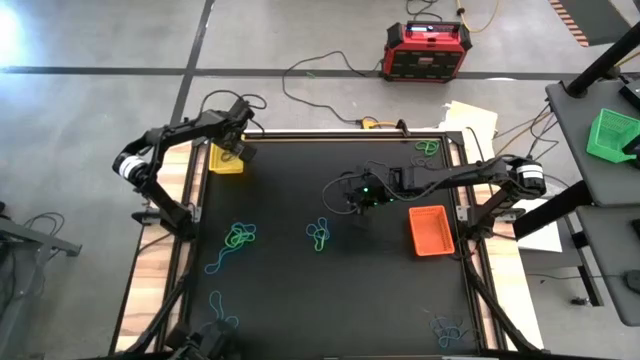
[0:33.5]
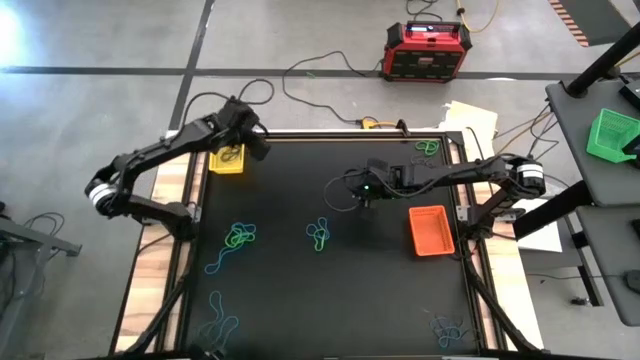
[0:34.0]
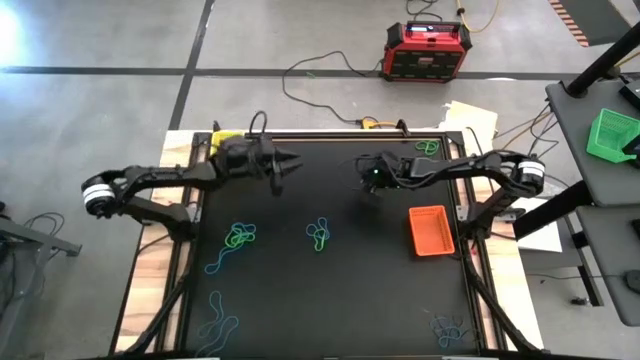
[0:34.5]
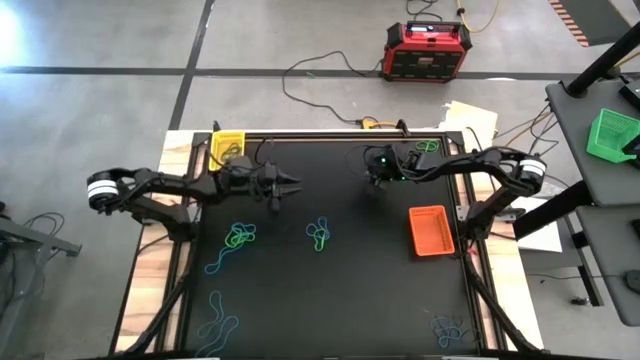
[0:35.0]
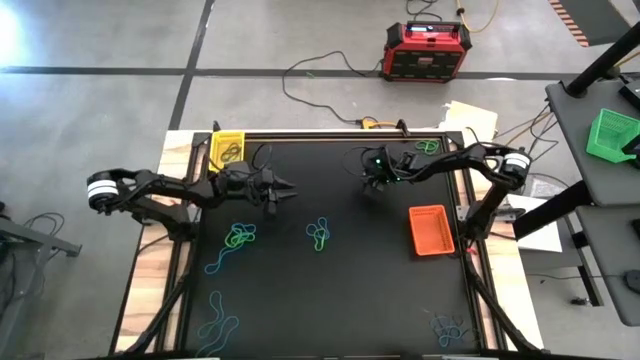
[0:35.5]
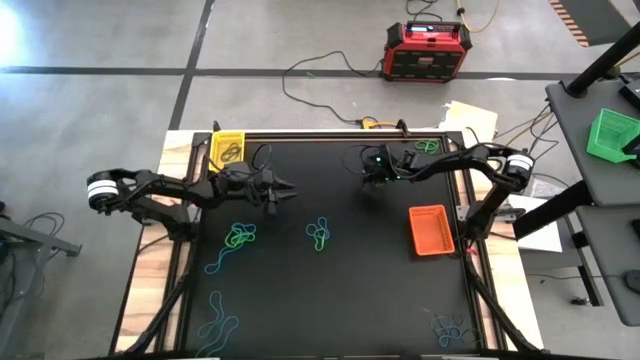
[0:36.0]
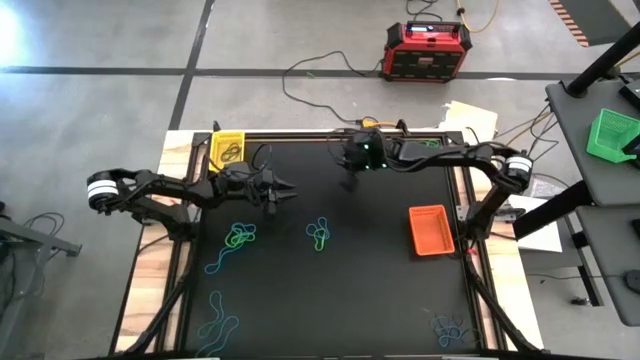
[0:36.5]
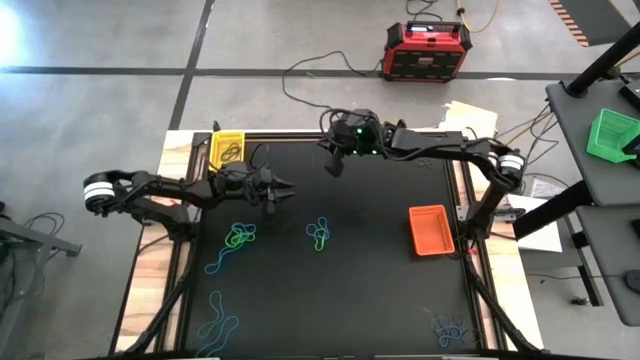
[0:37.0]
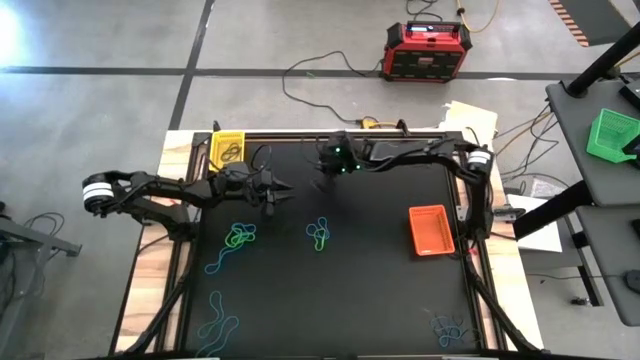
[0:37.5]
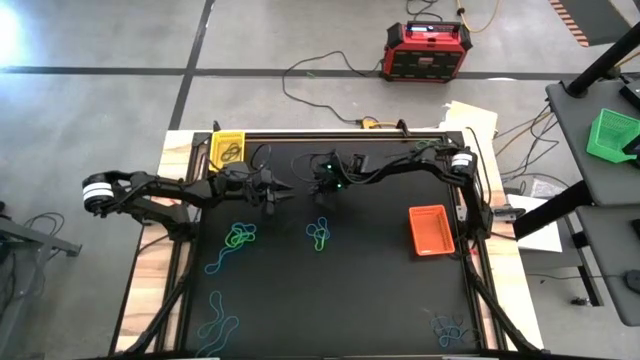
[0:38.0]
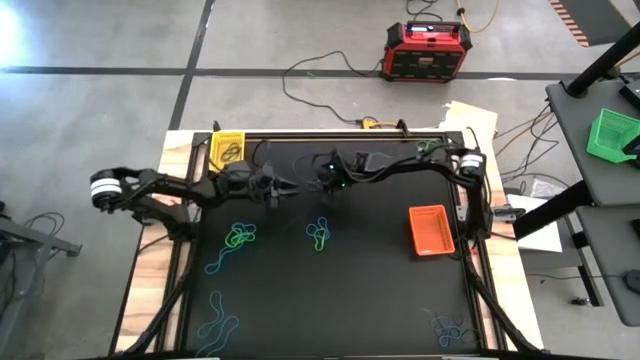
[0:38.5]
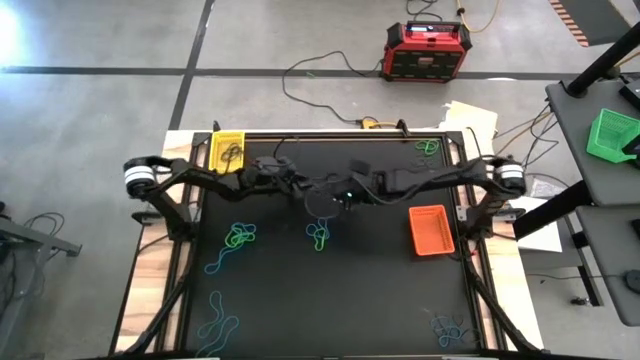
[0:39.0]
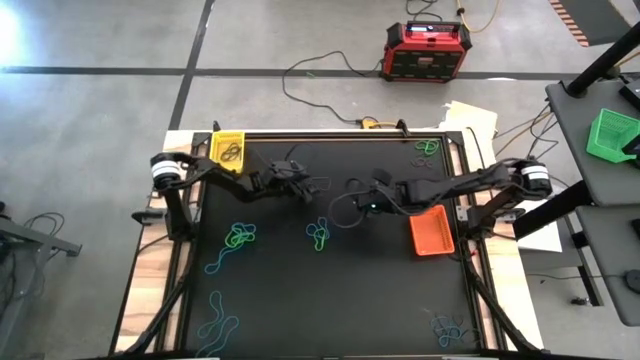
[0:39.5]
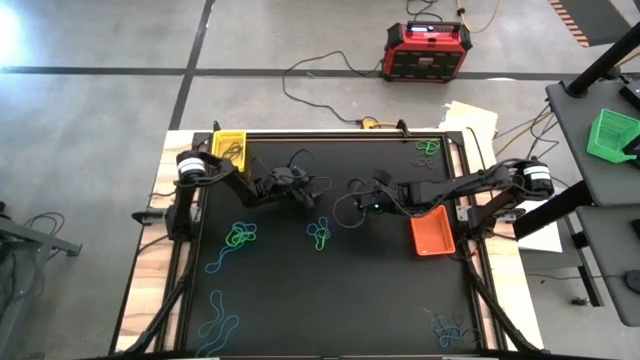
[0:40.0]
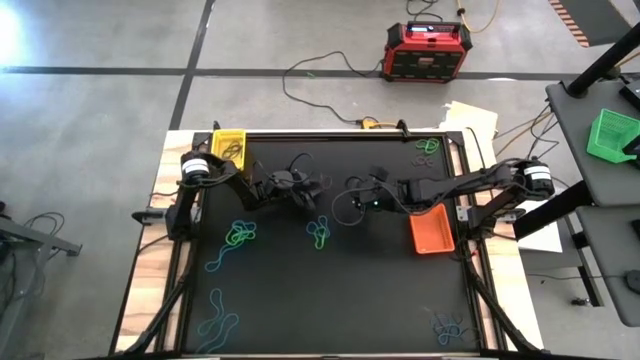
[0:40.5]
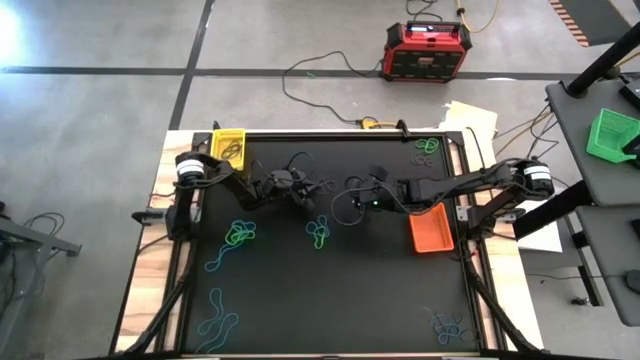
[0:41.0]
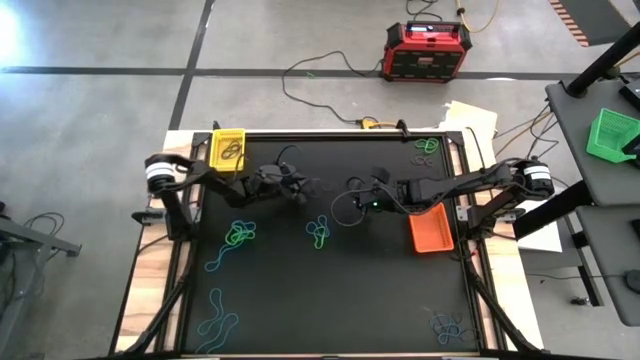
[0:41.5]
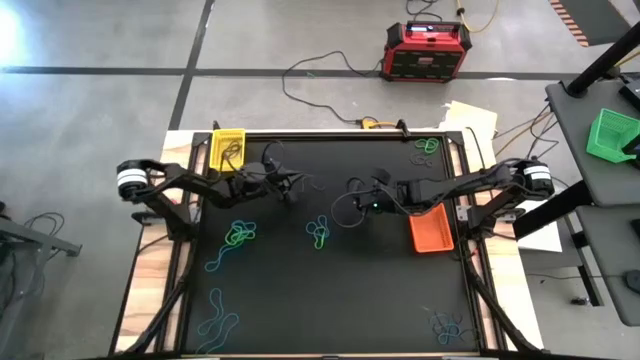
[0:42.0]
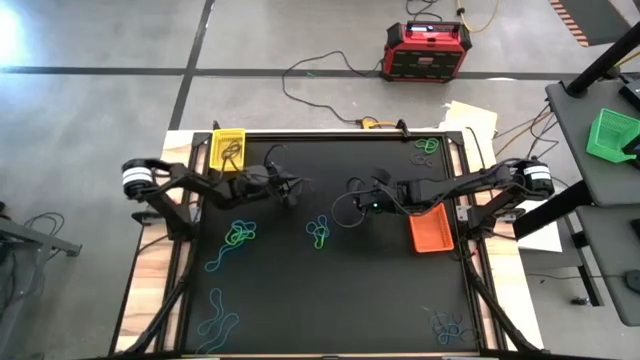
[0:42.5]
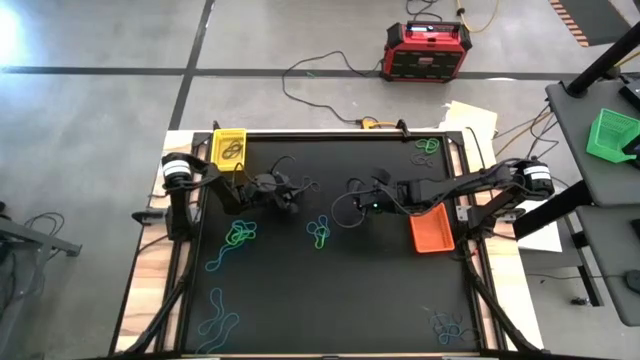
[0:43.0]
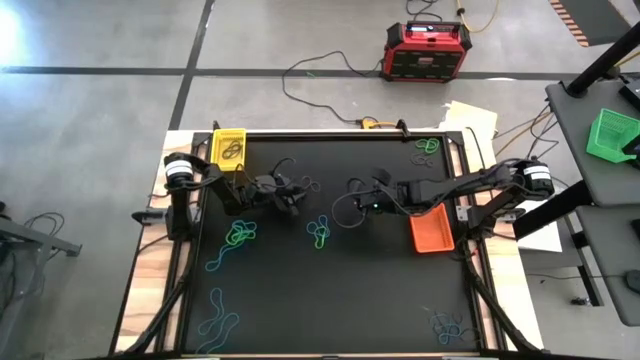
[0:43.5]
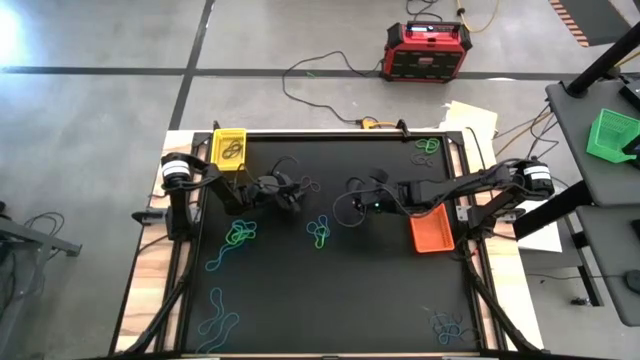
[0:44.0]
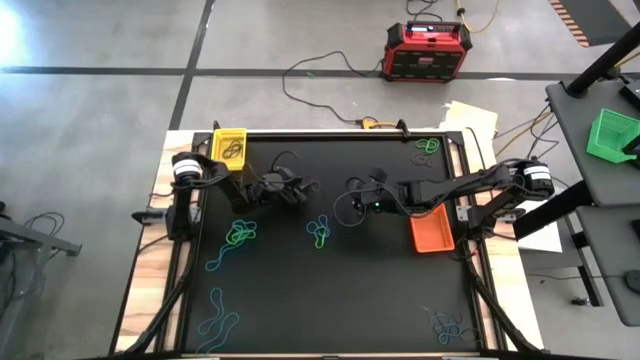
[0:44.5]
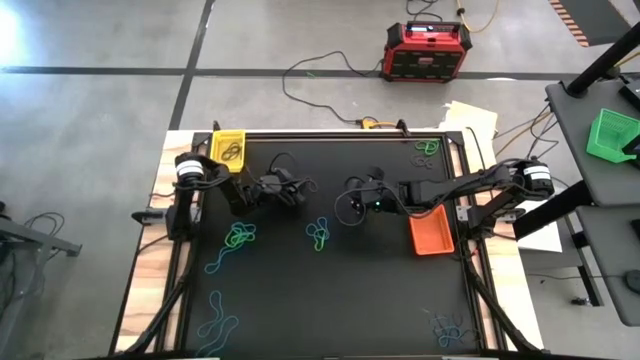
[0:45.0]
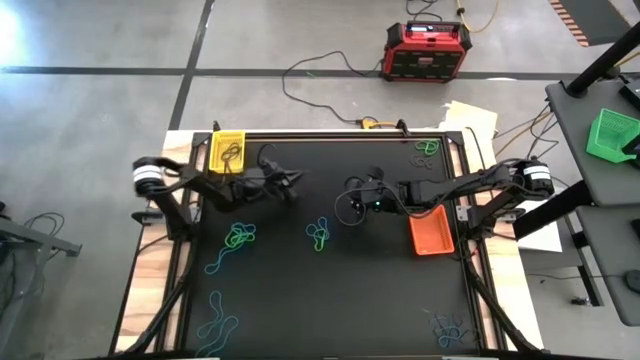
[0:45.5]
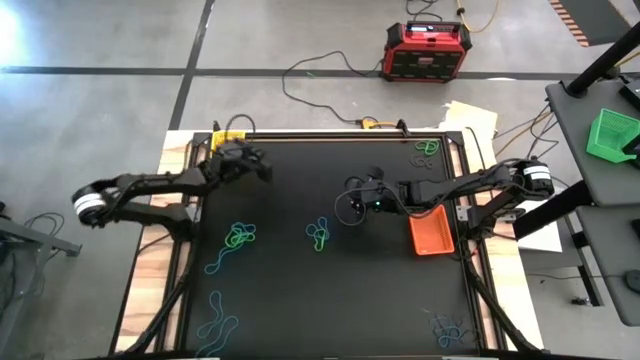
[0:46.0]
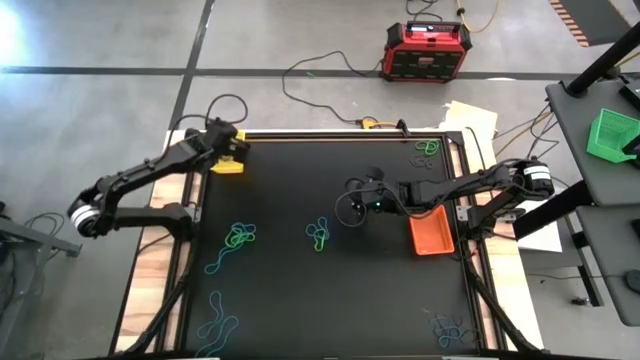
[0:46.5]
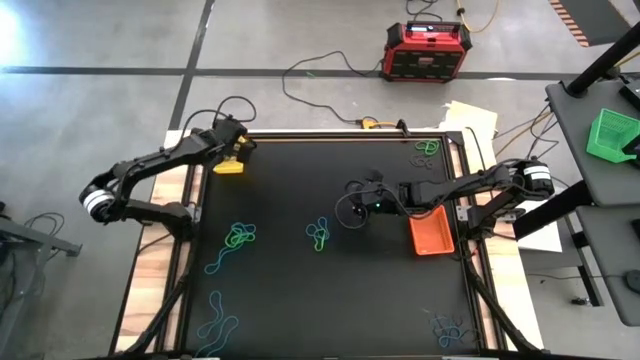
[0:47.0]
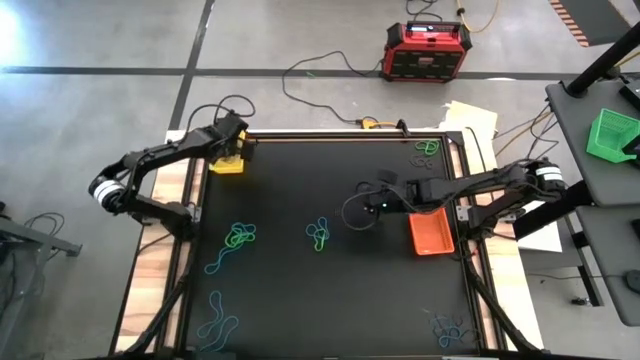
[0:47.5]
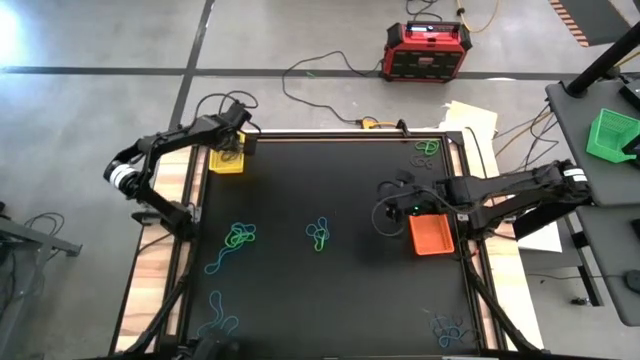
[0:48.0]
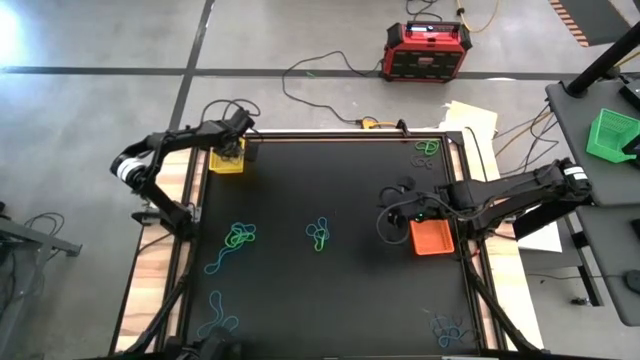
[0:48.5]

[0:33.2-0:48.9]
Task: Sort rubber bands into baskets
Put the purple rubber band into the yellow bin

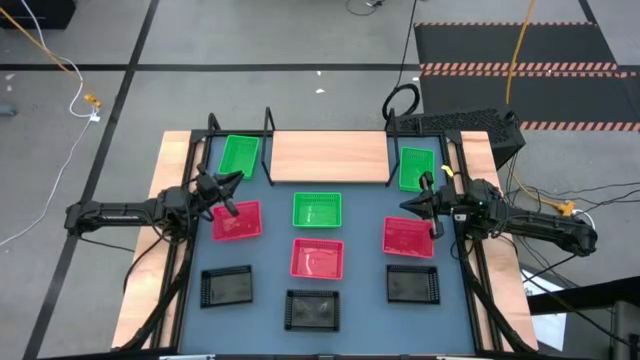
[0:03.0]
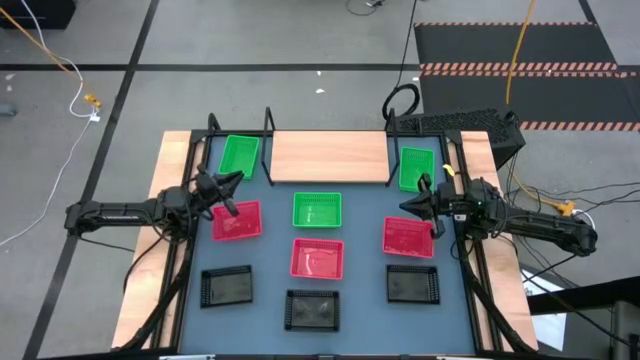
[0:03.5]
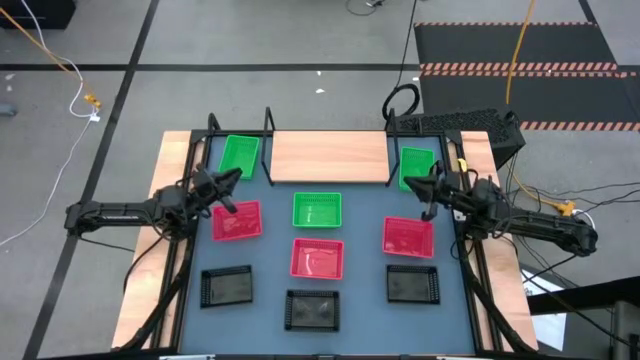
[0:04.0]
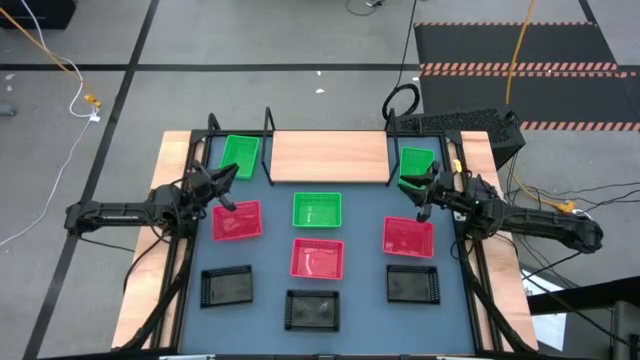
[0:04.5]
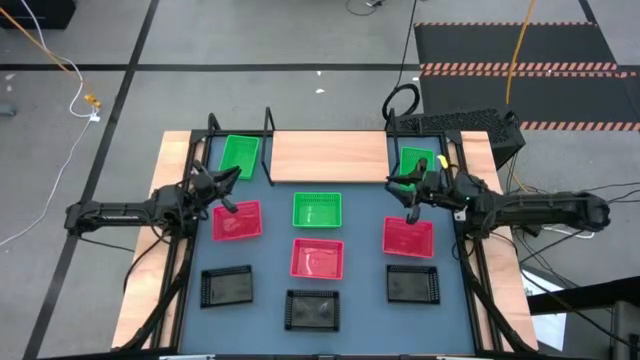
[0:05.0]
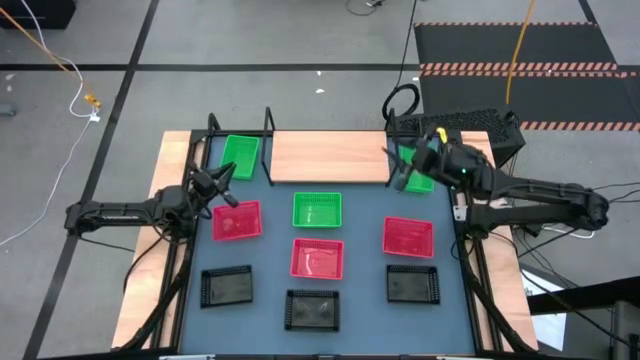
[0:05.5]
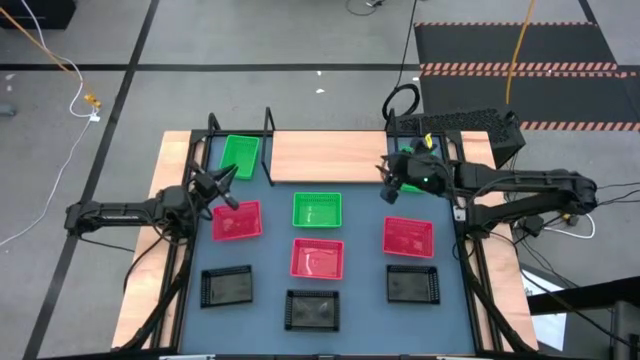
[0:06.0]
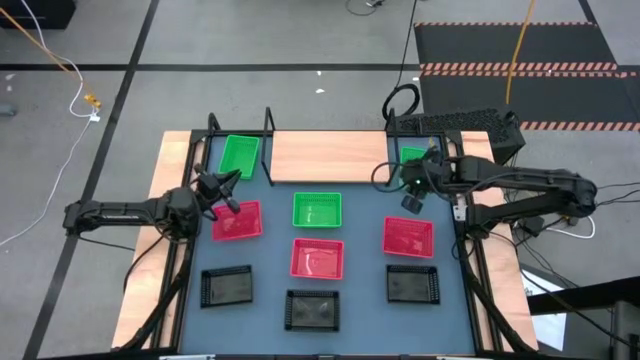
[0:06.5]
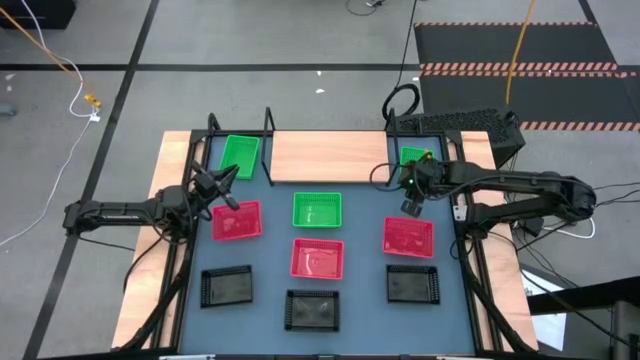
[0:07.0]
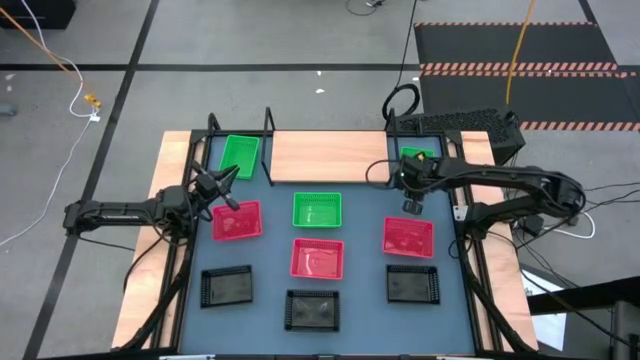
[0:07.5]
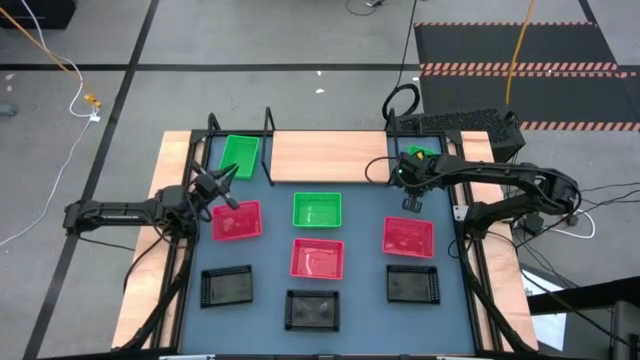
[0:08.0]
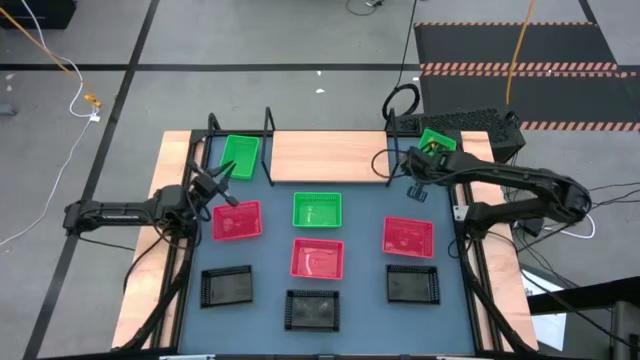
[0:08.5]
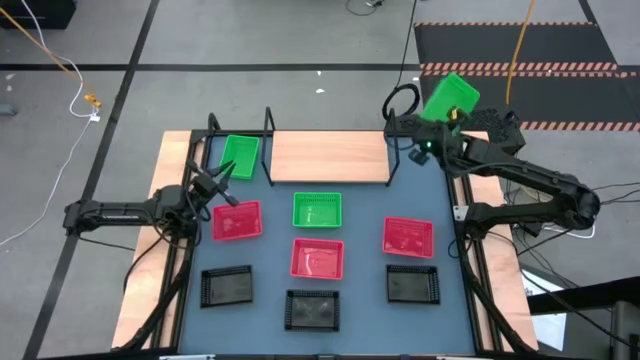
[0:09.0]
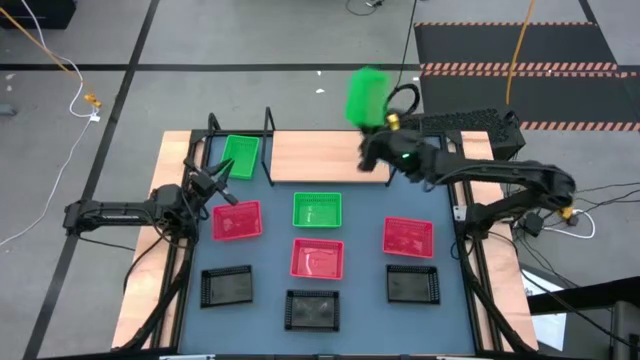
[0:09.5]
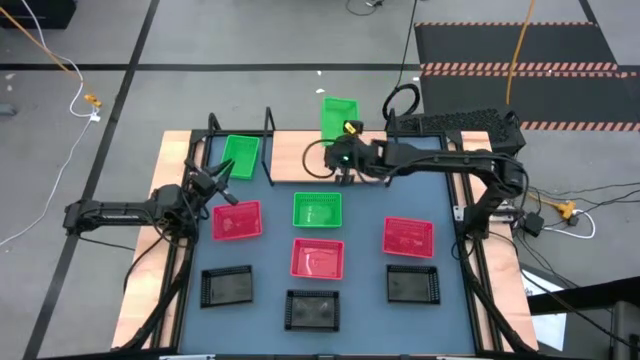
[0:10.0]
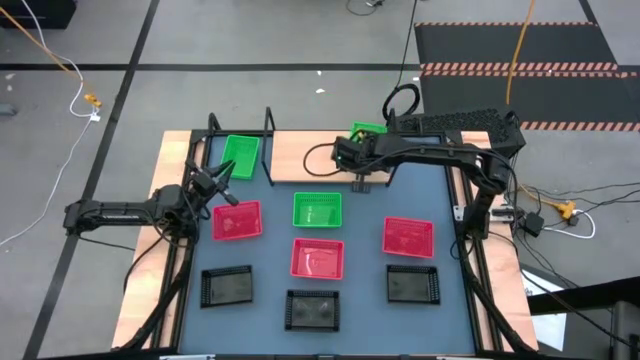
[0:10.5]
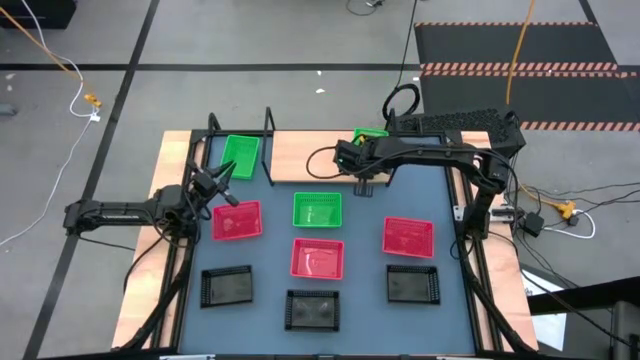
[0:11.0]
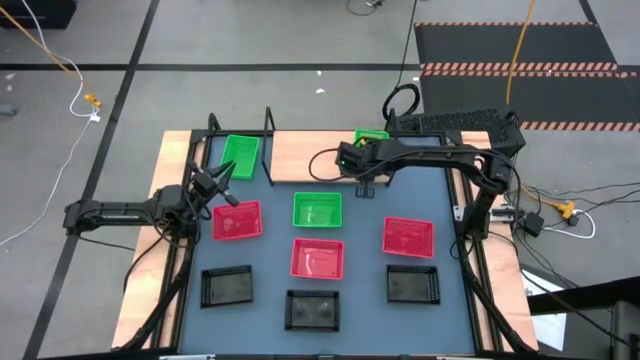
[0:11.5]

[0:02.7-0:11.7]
Task: Stack baskets on shelf by color
Put the top right green bin on the shelf
